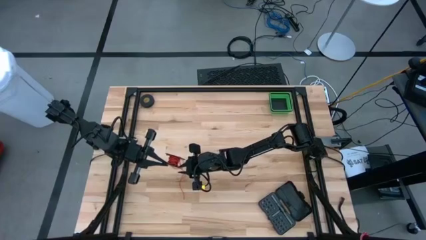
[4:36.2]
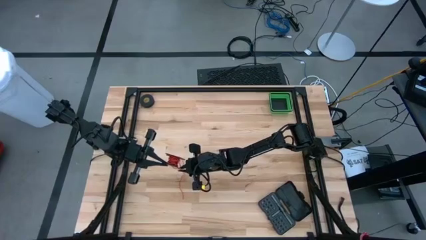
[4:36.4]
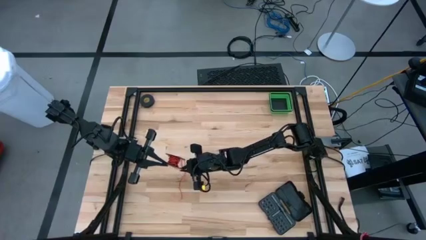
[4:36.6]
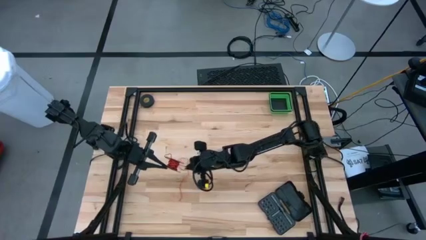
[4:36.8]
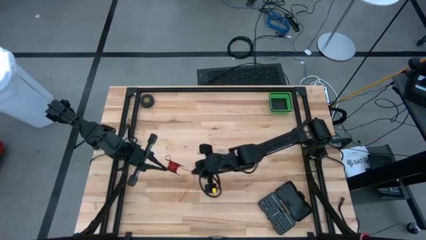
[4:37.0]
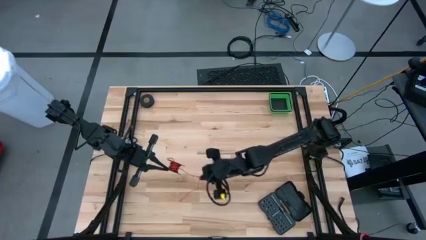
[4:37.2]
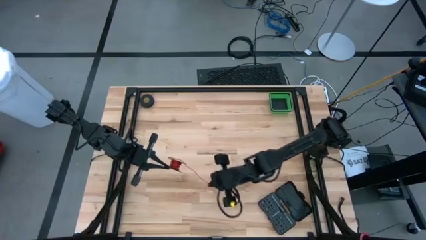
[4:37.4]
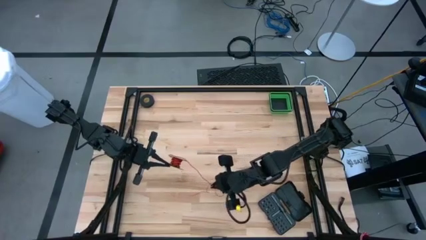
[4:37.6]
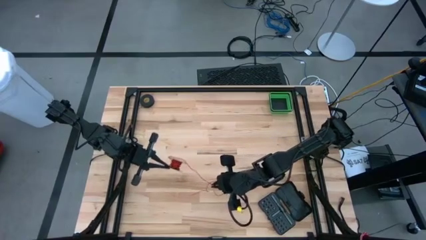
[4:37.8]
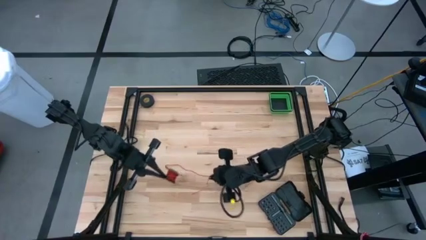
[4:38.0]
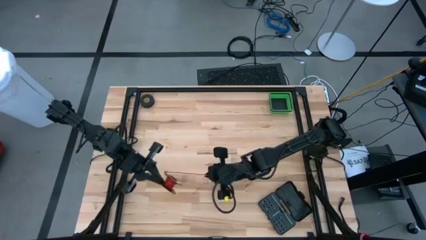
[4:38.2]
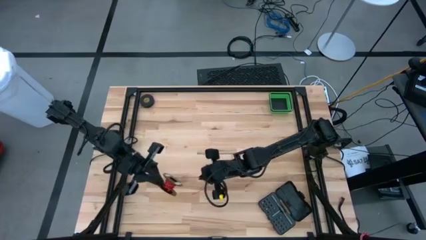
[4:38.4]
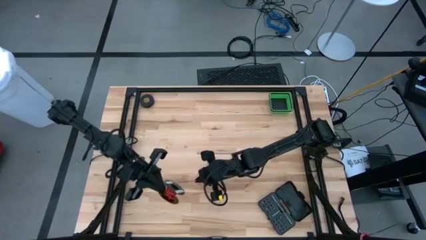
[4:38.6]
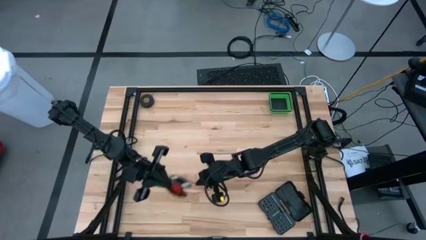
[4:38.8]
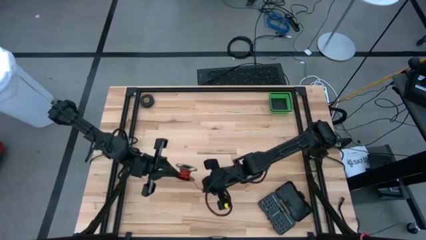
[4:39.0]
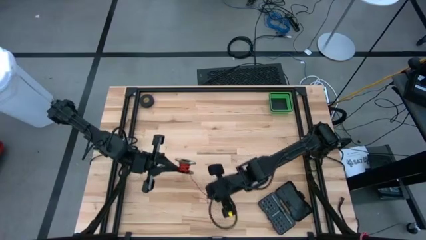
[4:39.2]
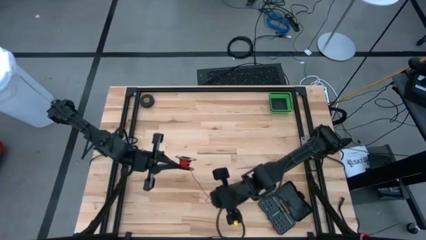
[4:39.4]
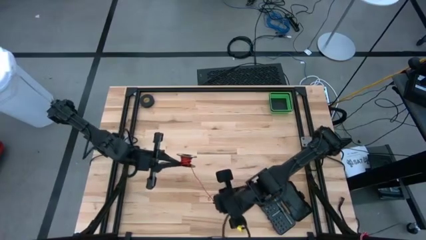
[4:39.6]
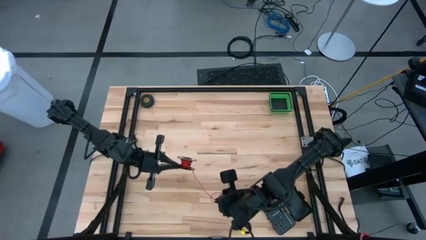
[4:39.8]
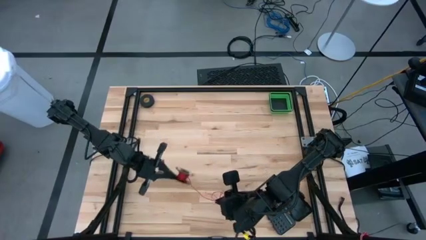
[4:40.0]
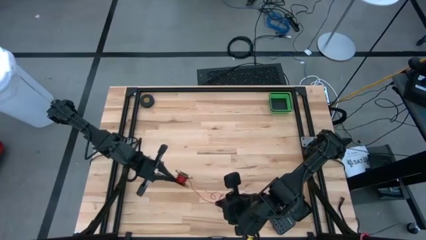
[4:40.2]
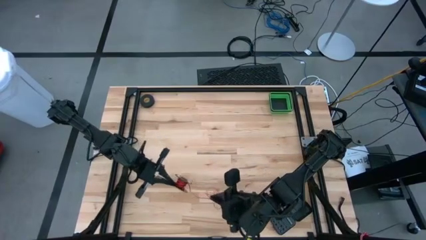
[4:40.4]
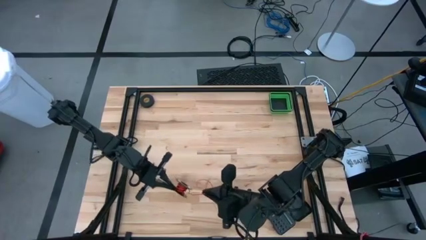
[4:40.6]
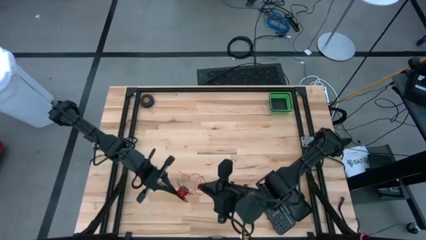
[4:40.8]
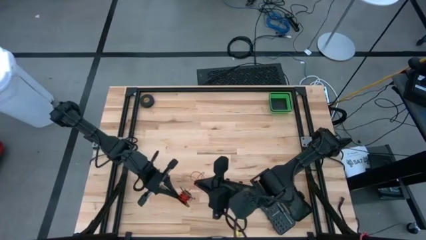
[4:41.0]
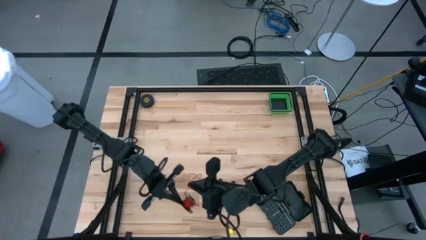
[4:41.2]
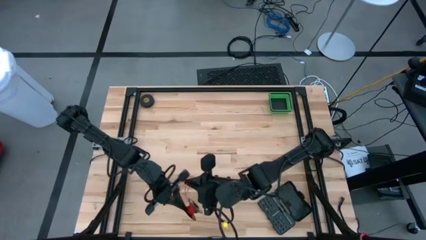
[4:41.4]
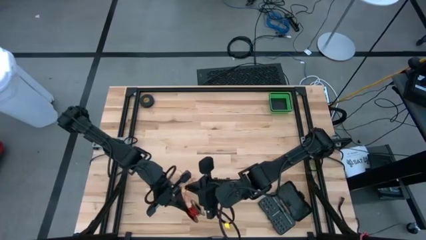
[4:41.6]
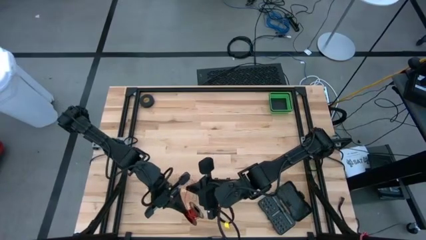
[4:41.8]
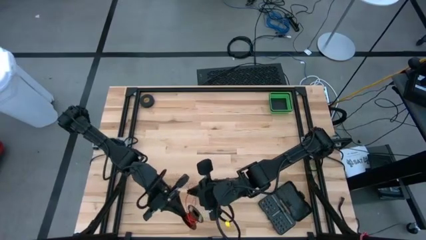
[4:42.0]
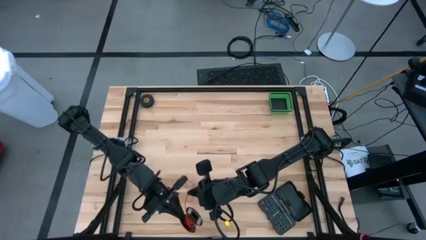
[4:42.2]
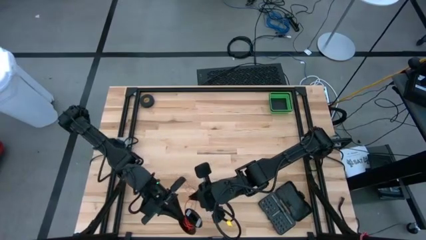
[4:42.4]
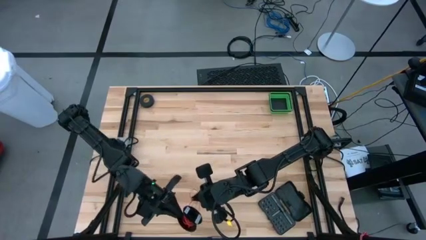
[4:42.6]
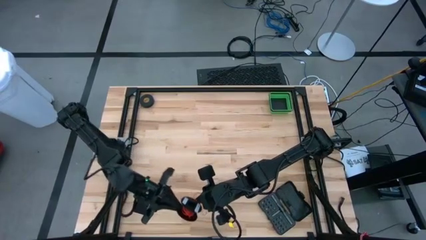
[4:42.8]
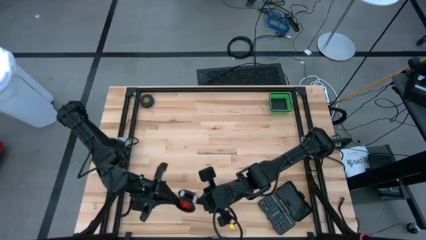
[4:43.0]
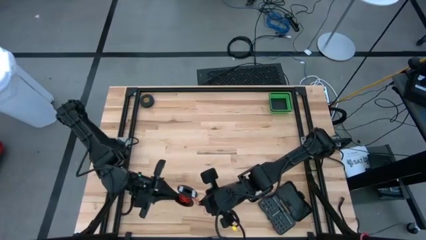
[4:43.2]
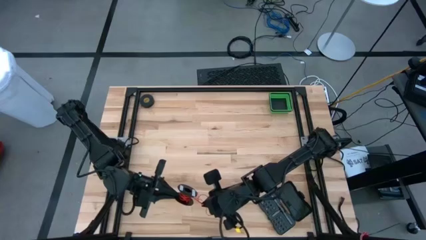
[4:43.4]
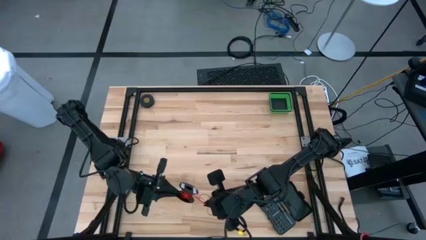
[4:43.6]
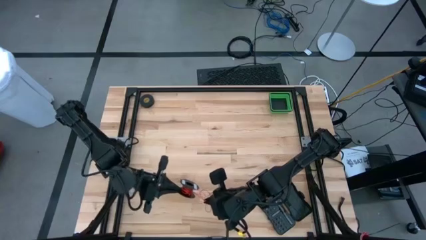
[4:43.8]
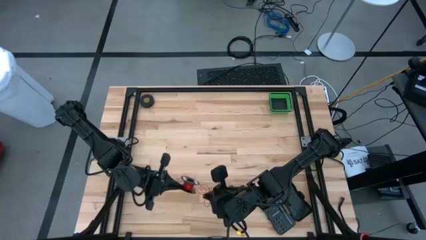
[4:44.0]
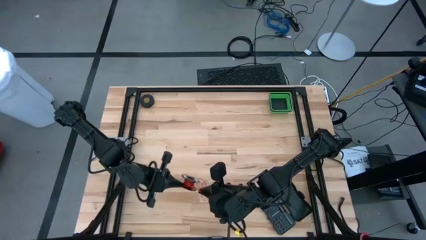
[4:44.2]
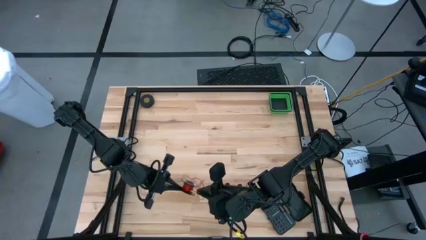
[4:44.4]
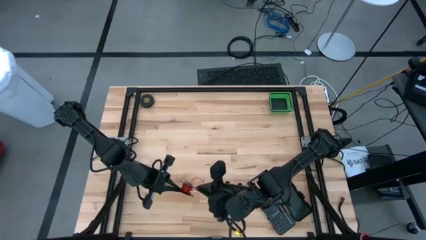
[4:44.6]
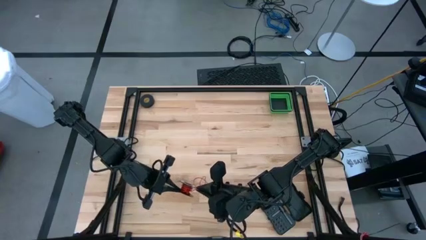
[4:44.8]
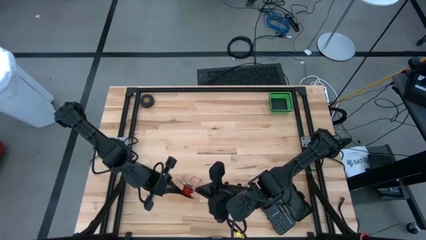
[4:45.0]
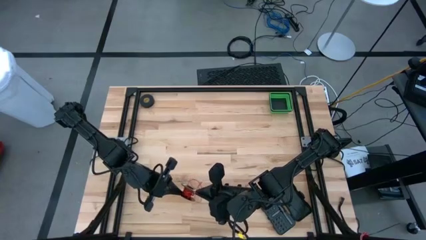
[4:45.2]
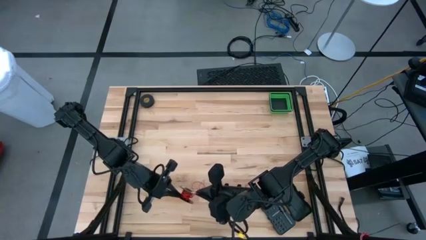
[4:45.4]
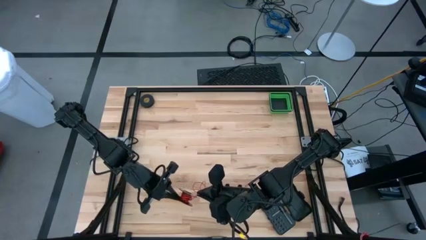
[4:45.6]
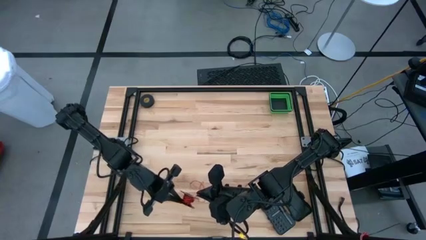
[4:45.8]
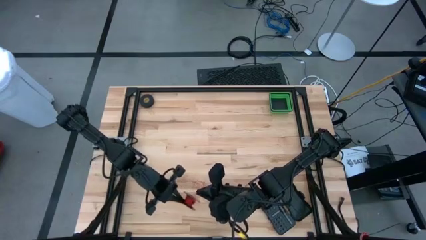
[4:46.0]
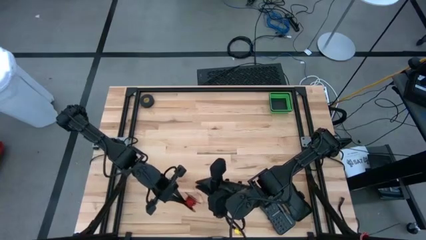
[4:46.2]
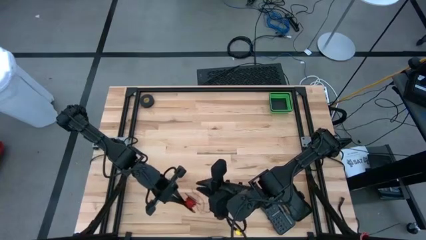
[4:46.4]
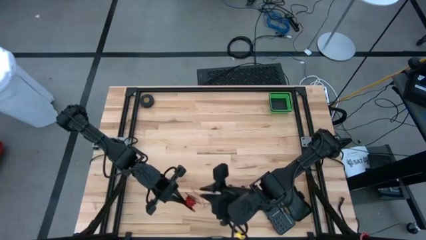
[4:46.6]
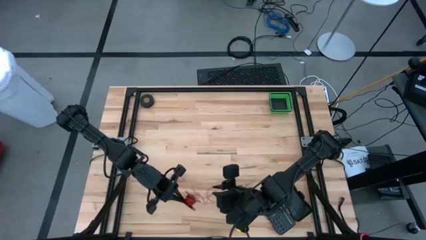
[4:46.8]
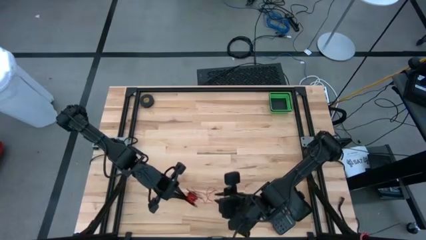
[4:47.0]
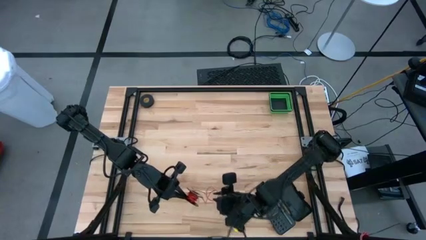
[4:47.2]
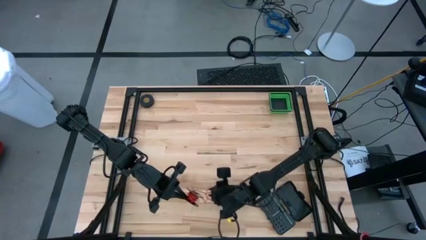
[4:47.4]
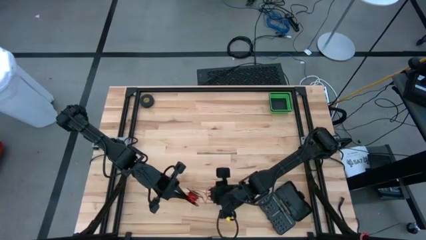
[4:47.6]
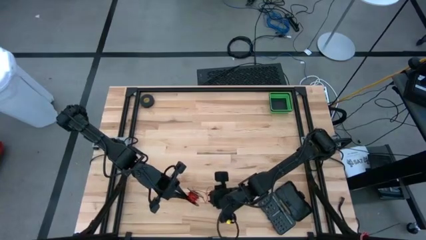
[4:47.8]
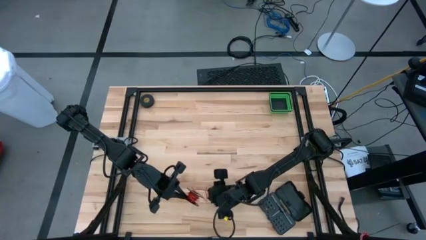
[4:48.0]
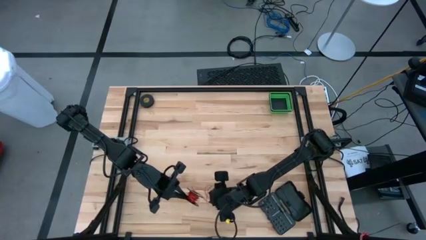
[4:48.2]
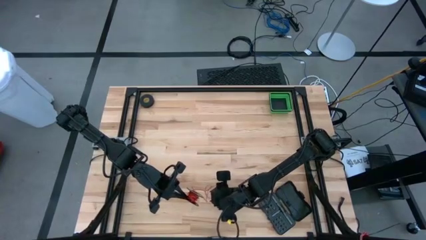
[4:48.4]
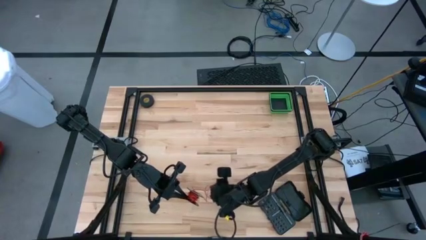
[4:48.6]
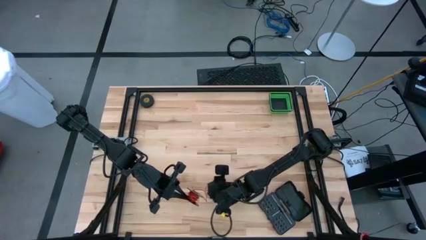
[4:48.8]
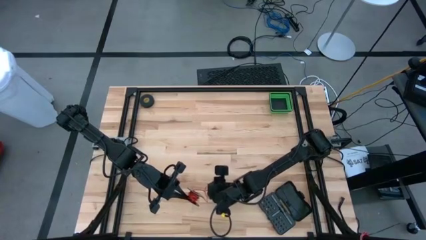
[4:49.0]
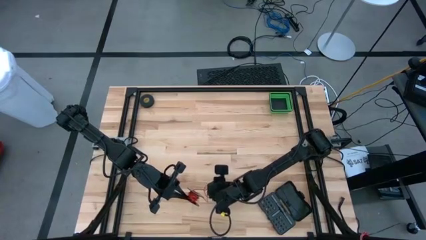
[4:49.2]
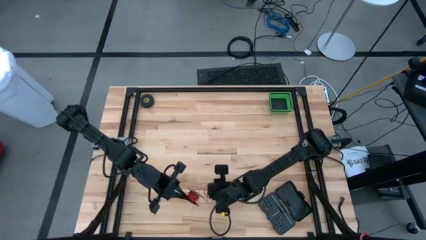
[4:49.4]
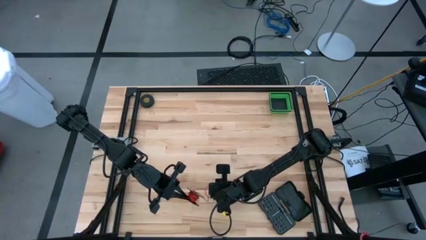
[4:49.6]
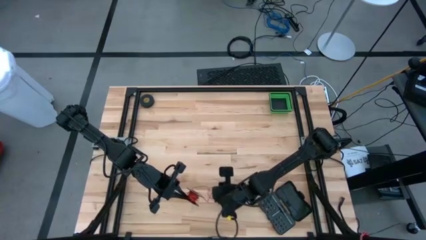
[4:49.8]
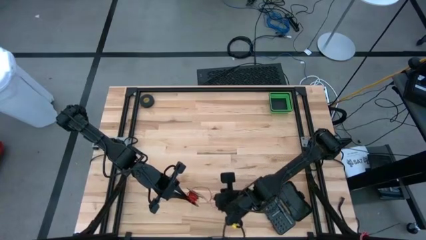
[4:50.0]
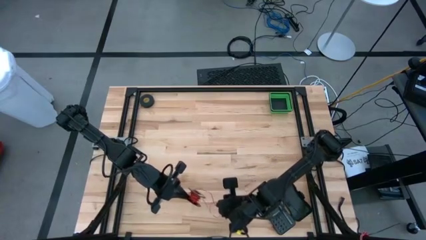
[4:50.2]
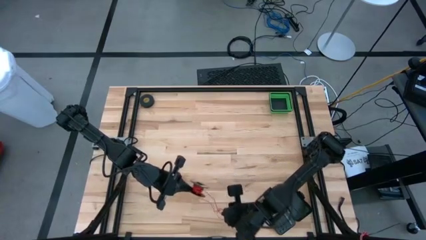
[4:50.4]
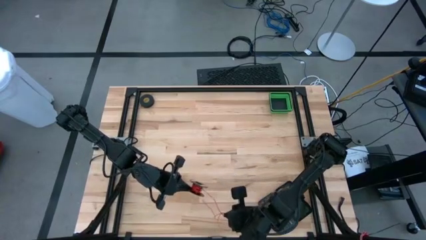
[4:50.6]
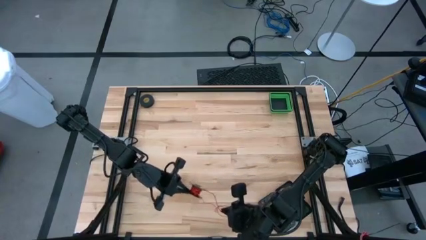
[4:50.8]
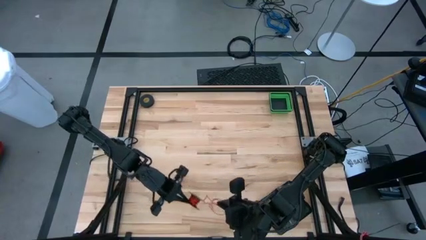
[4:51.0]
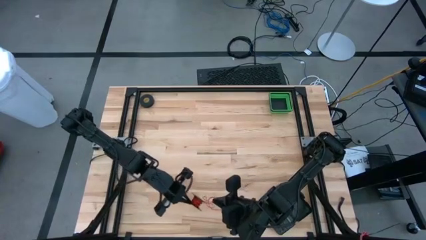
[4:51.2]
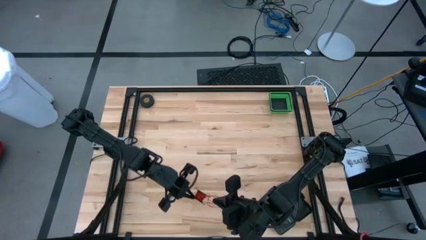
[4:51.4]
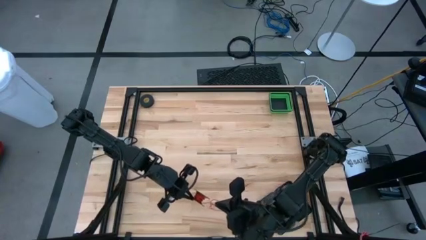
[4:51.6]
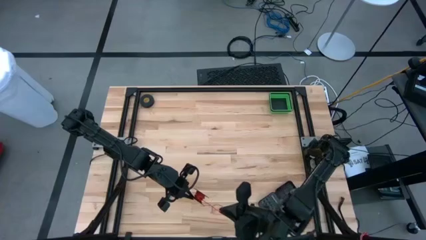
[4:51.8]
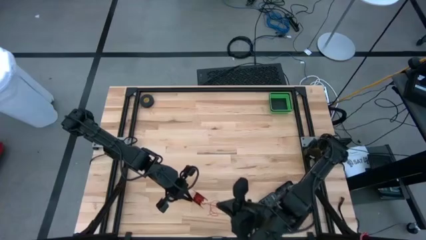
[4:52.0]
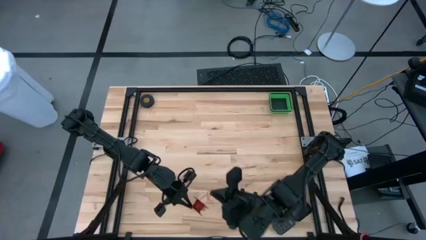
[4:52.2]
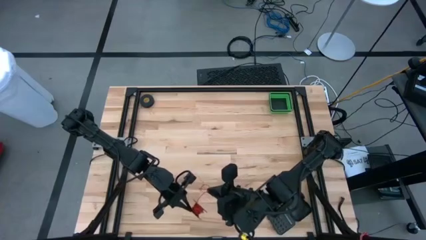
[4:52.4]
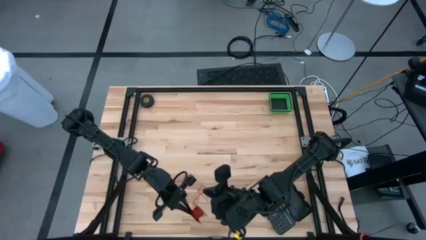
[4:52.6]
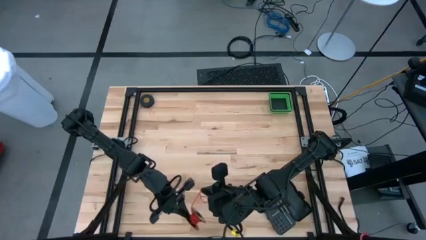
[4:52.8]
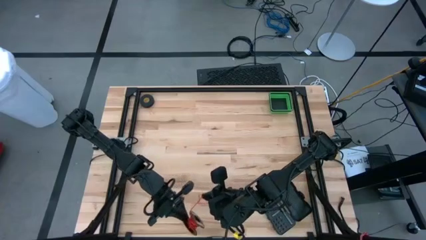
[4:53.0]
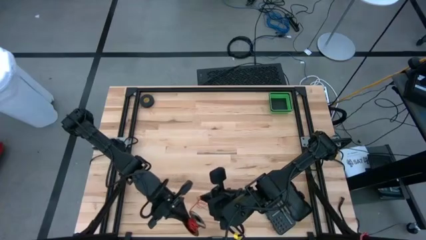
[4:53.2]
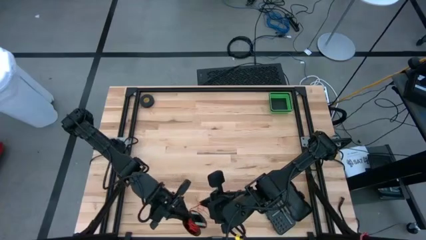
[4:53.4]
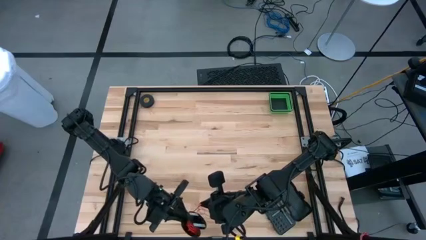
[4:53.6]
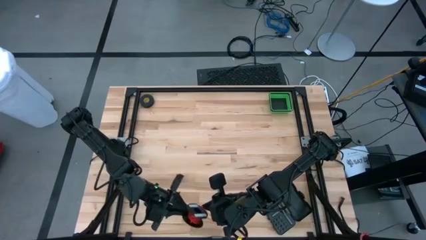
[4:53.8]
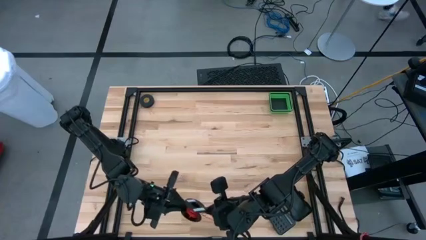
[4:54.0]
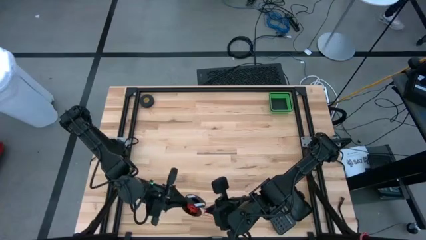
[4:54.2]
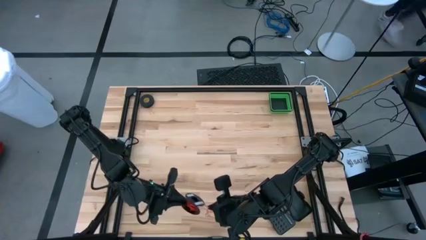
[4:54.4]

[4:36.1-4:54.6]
Task: Coil cords
Coil the red wire on the black spool
